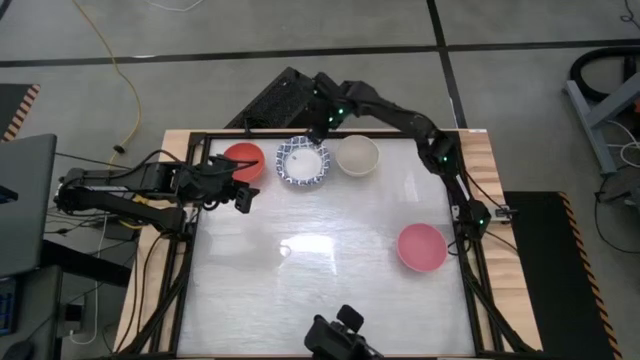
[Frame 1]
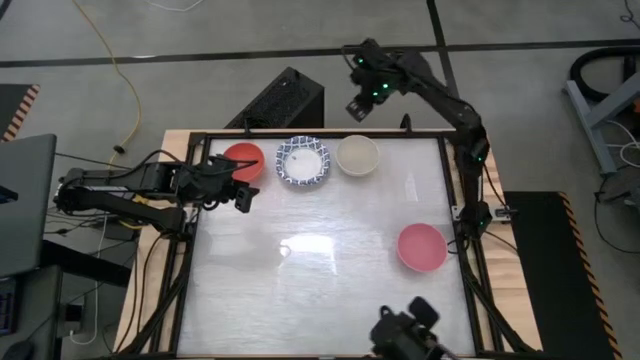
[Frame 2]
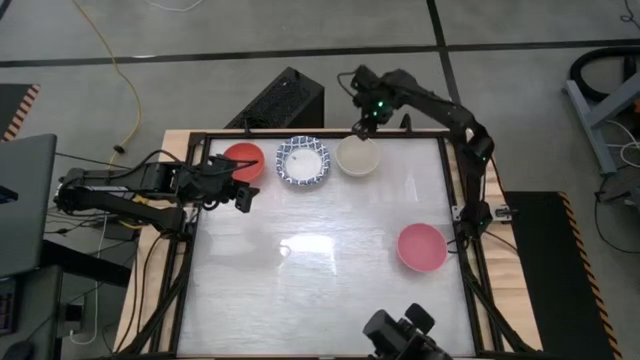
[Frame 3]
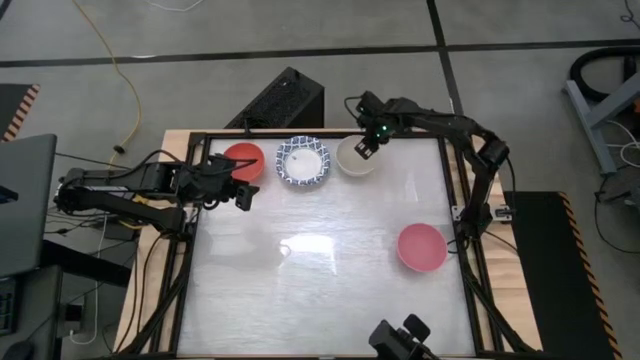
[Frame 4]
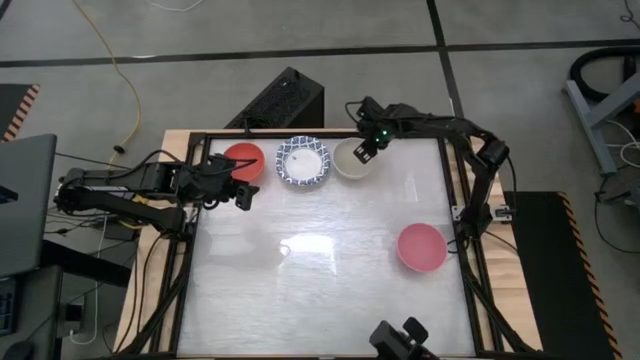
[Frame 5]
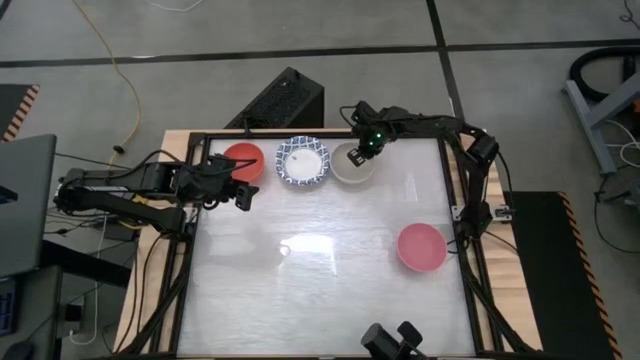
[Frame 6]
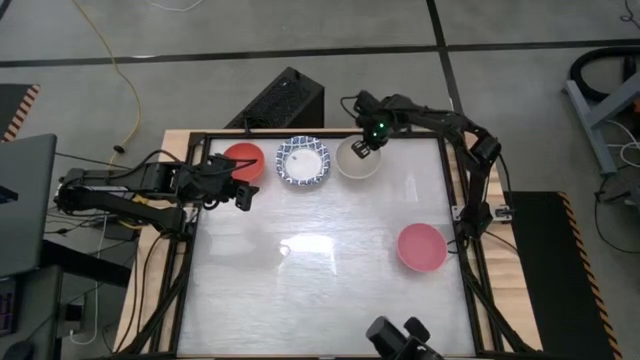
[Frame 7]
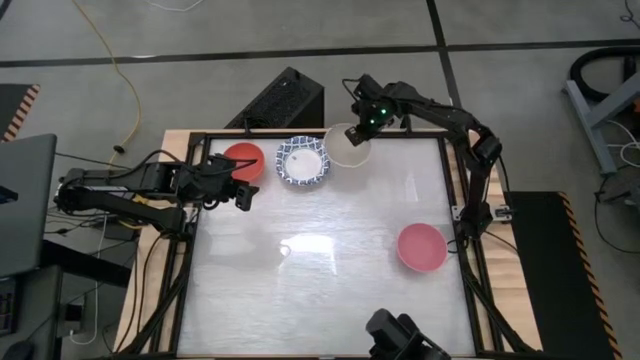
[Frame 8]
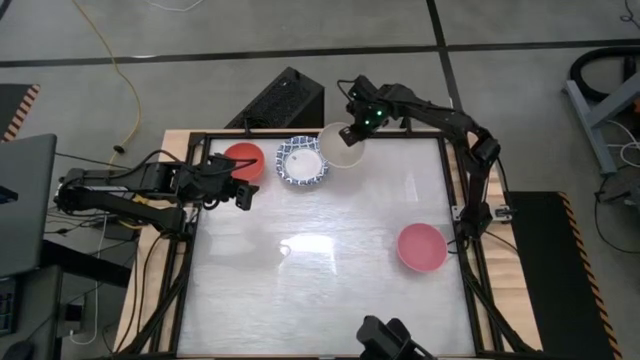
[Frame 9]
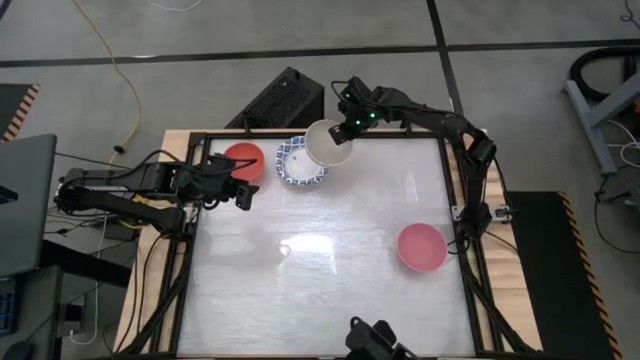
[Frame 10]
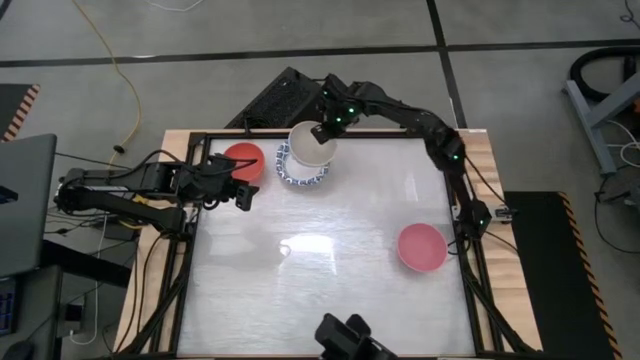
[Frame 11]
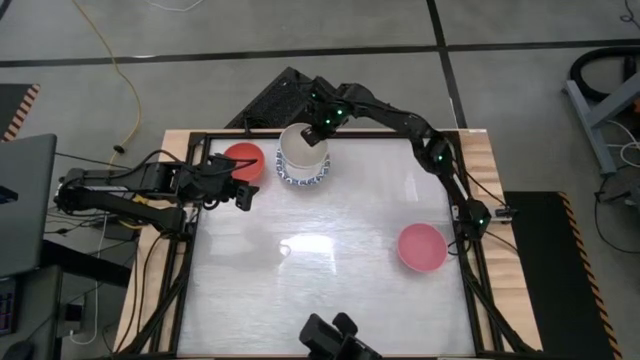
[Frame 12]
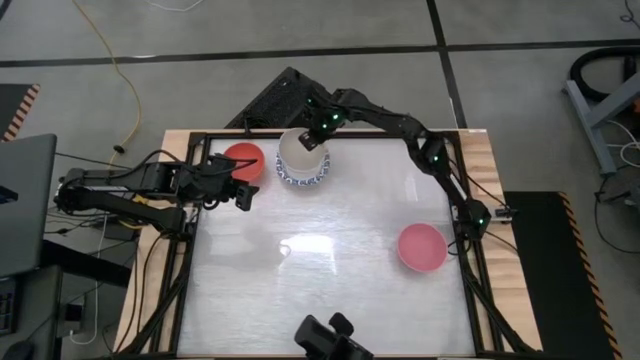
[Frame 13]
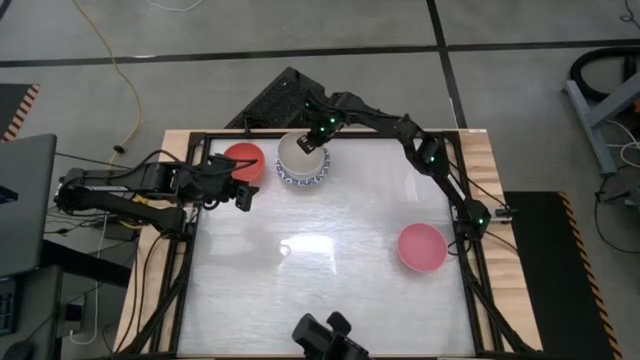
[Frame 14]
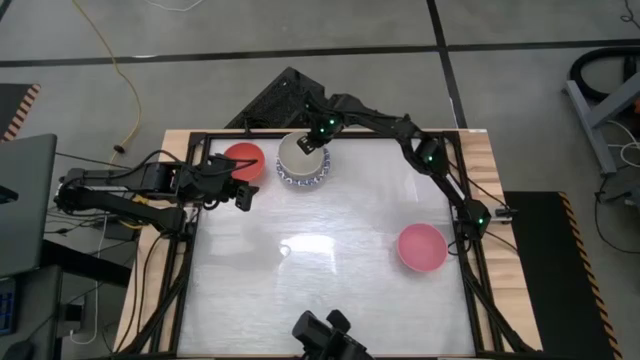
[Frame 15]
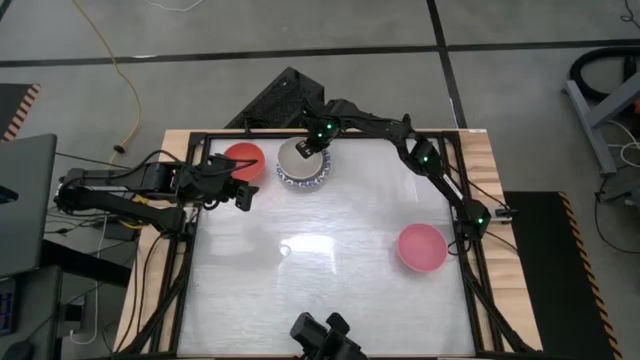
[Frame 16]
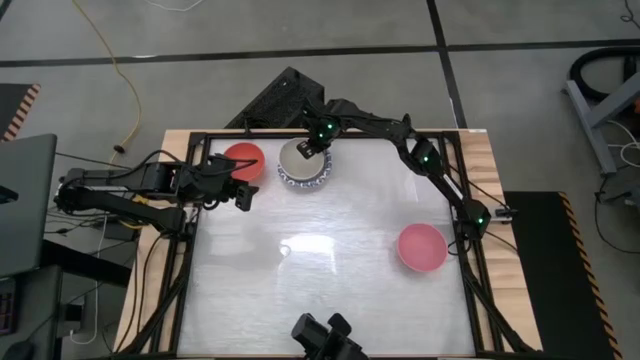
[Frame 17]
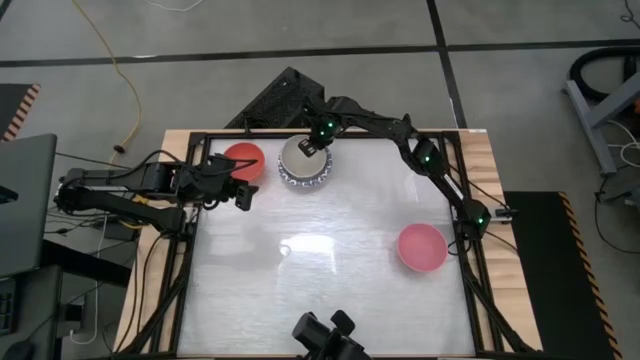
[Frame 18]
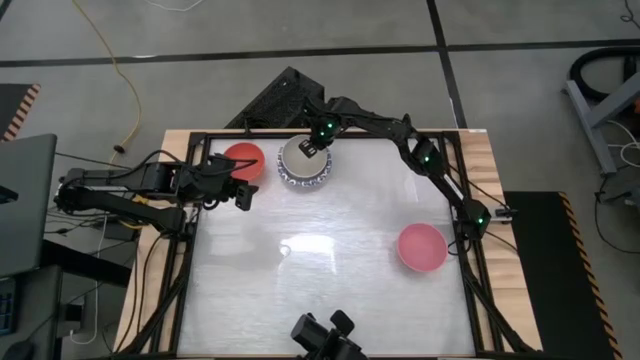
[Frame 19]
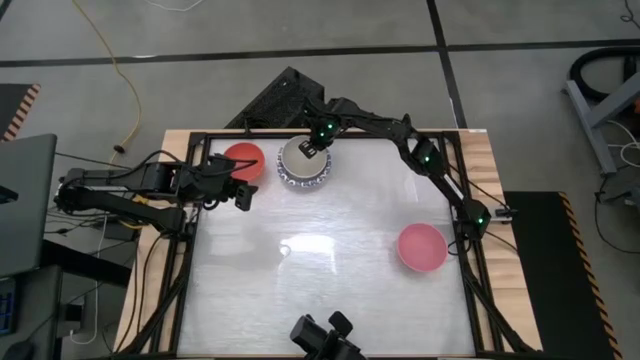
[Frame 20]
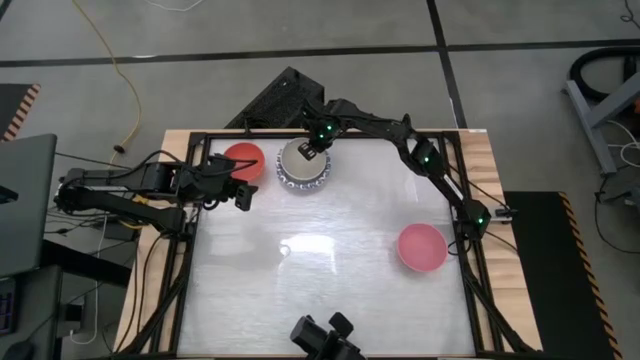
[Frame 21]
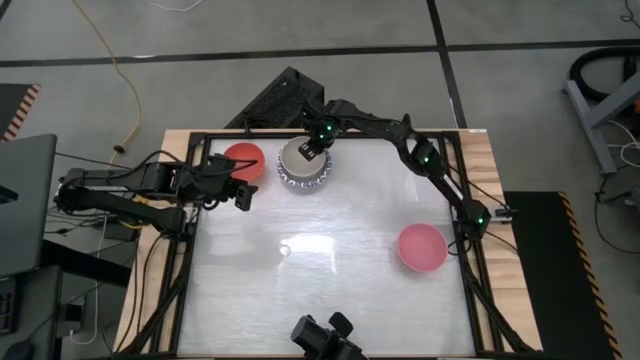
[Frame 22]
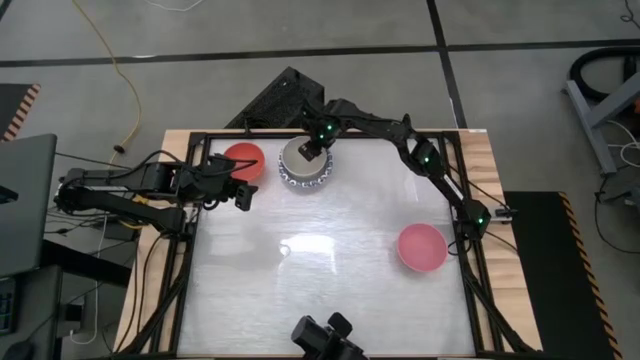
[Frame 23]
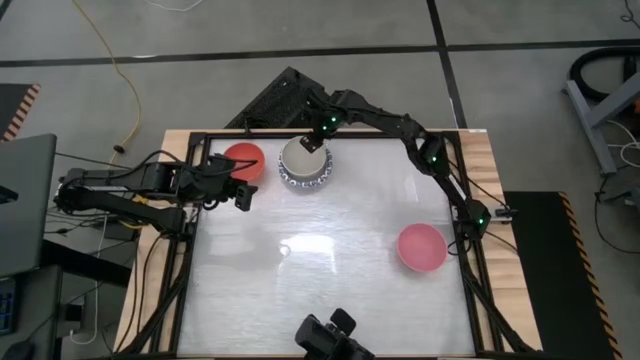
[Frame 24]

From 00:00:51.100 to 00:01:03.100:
Stack the white bowl on top of the blue patterned bowl

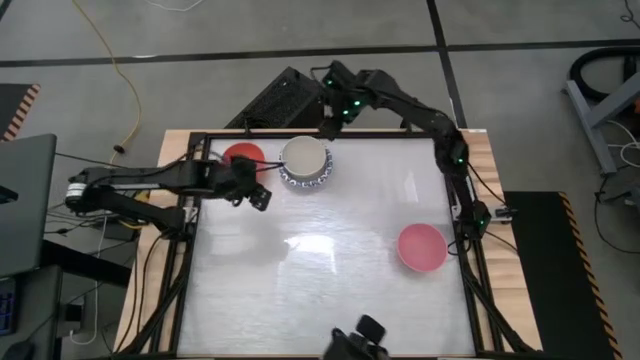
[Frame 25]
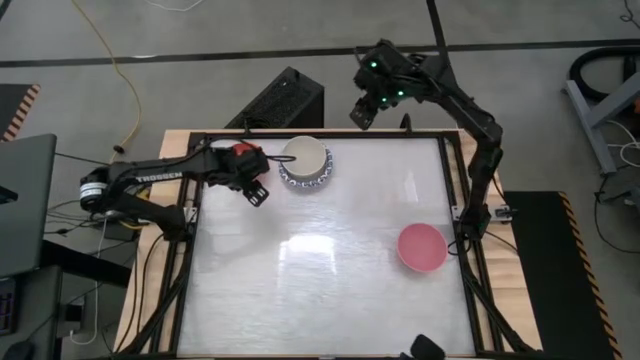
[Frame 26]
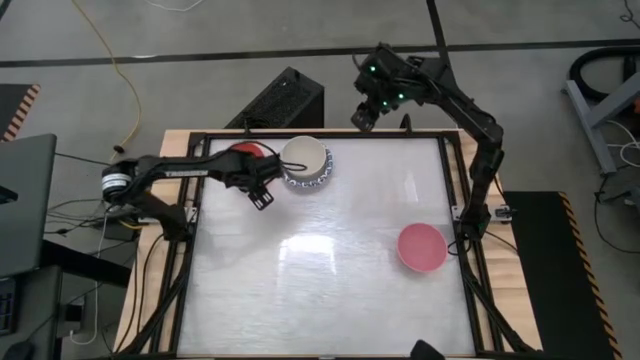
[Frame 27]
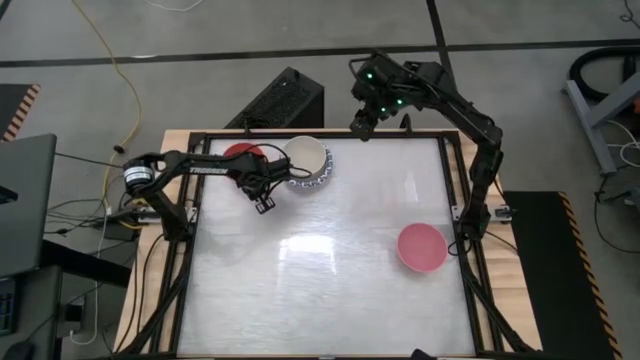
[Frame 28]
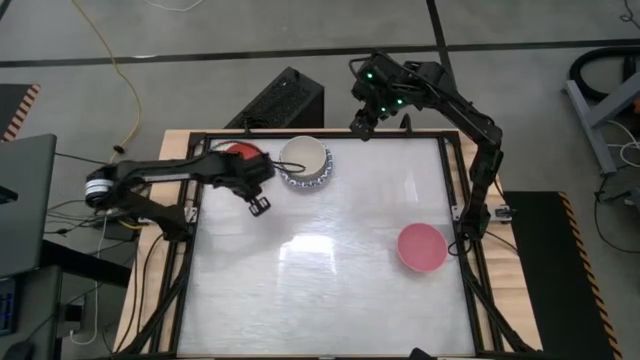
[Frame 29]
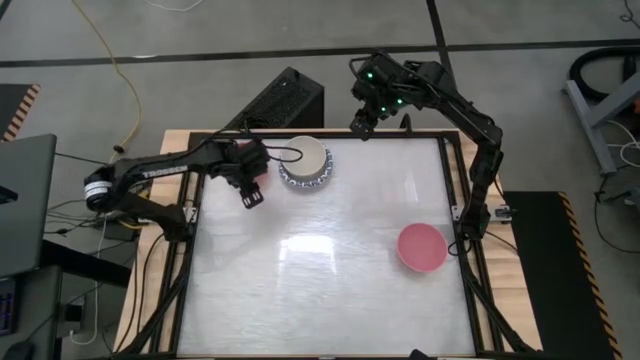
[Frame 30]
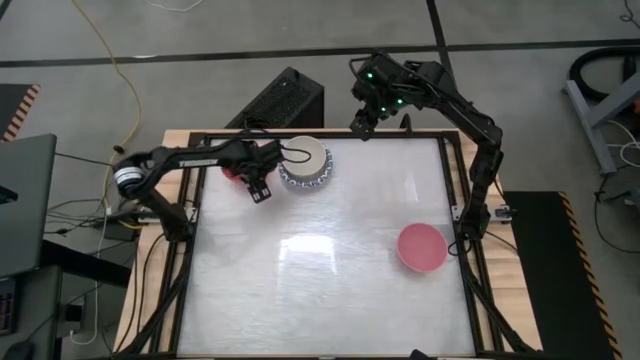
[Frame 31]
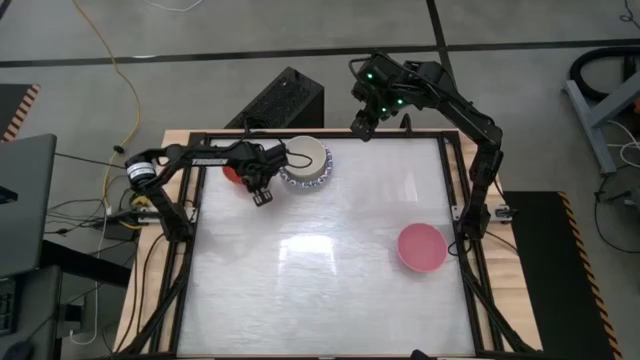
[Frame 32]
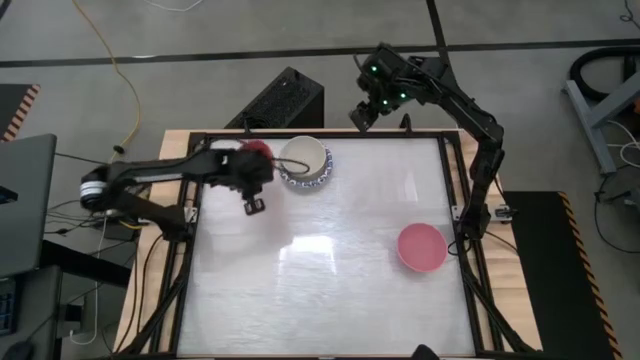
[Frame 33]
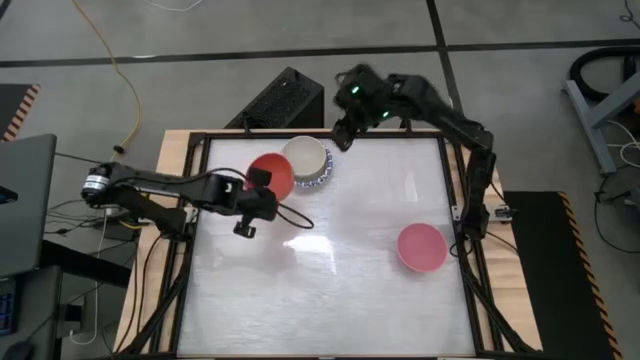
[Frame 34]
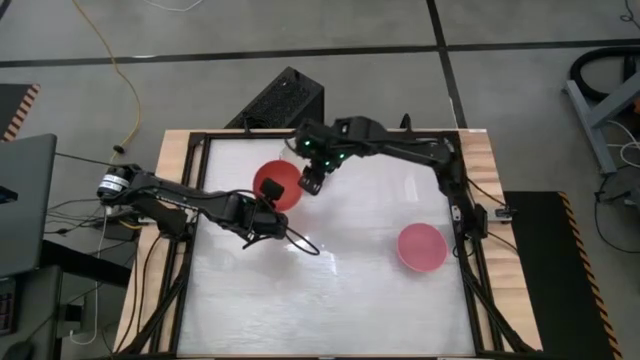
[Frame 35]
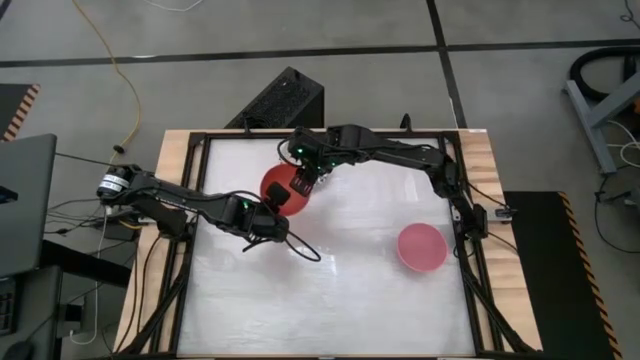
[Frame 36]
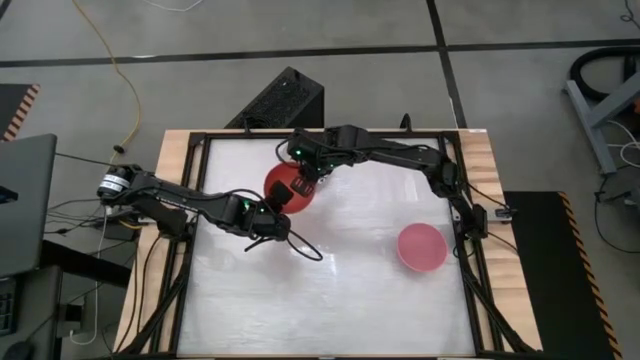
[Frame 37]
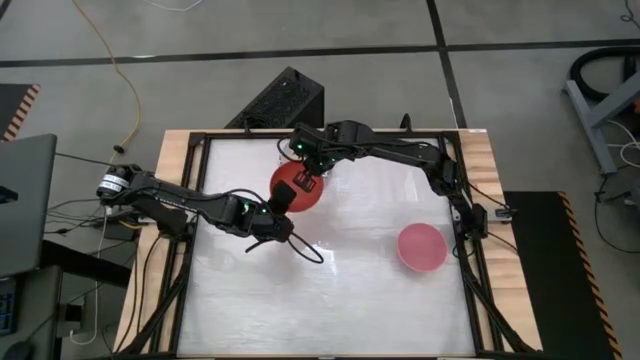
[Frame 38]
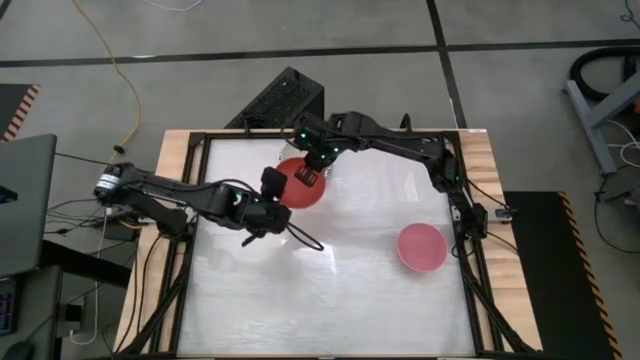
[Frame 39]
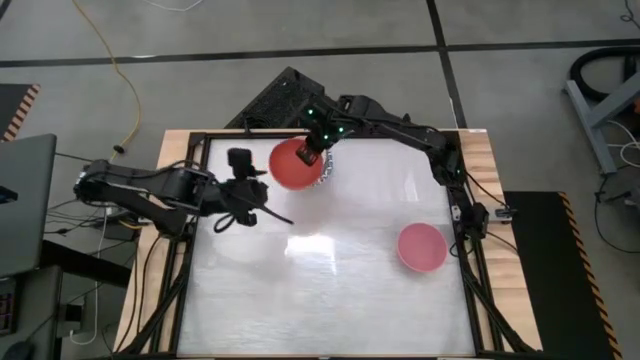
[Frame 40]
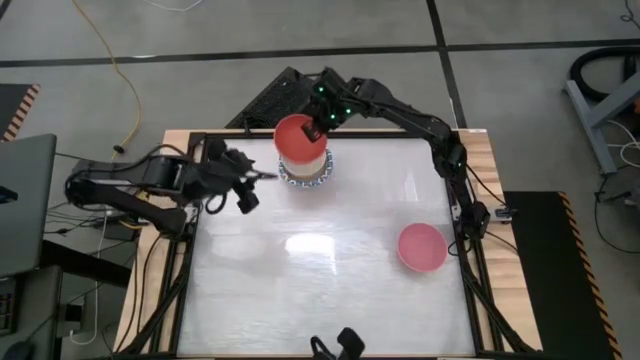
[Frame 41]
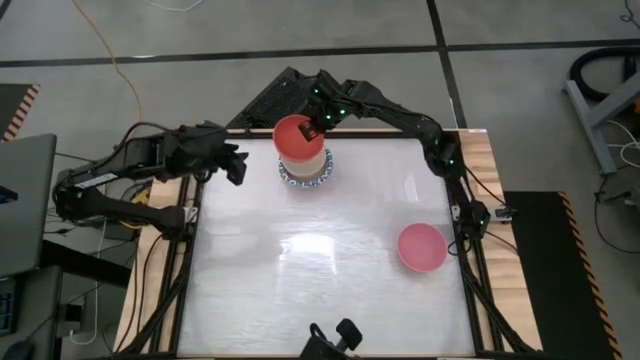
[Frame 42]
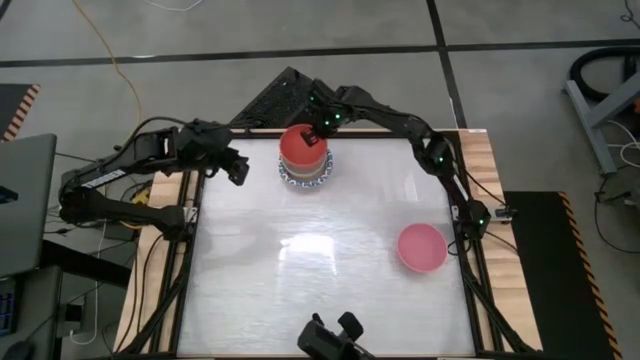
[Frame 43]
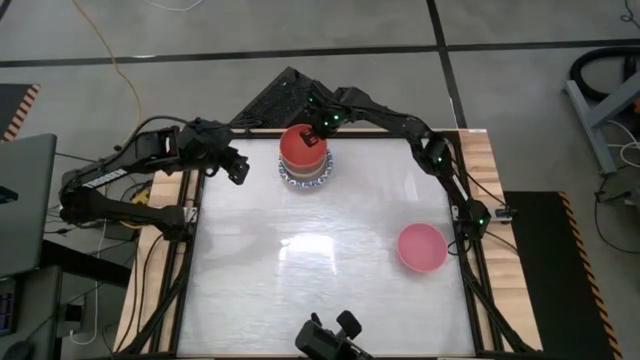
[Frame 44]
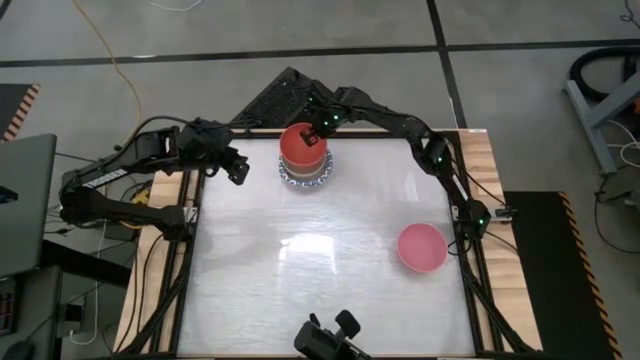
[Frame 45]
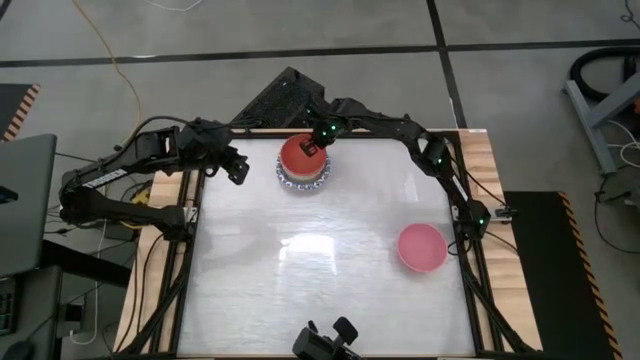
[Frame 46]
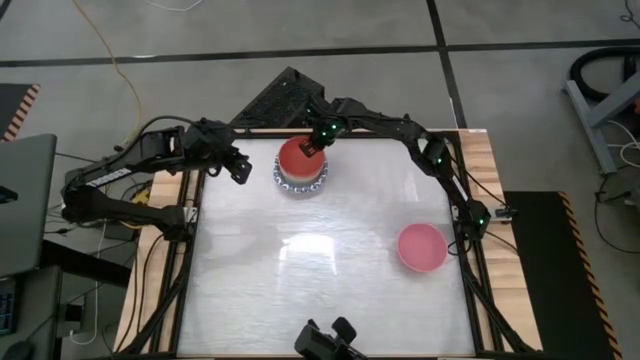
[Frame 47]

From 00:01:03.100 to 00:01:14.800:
Stack the orange bowl on the top of the white bowl
